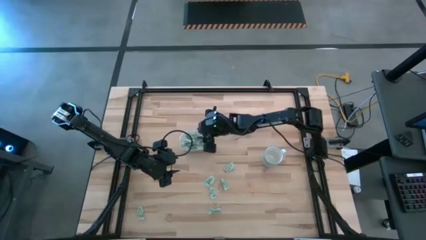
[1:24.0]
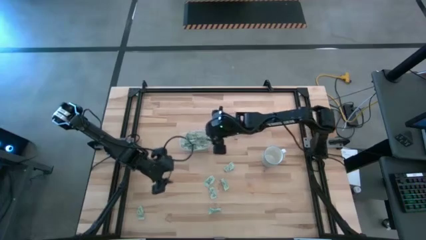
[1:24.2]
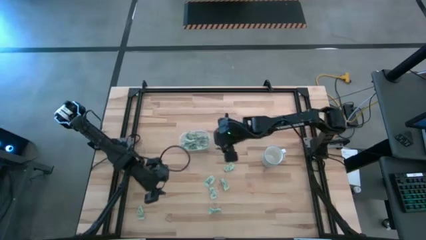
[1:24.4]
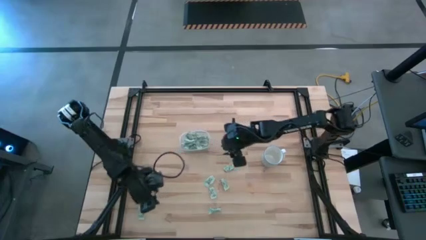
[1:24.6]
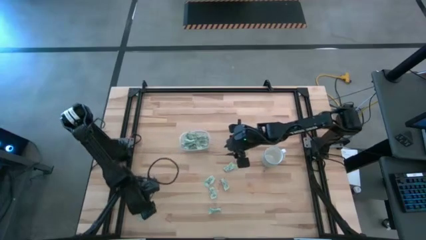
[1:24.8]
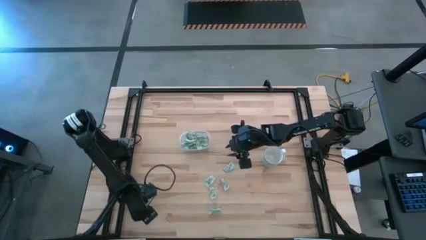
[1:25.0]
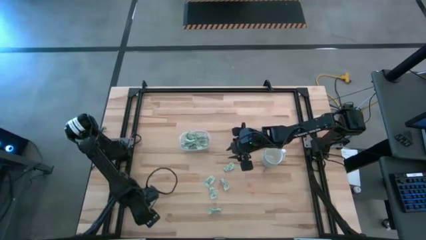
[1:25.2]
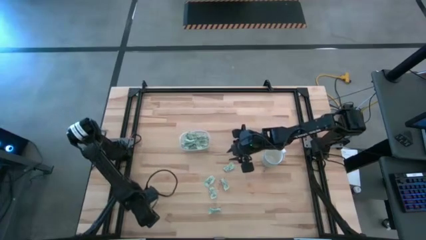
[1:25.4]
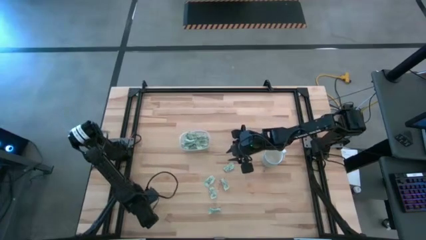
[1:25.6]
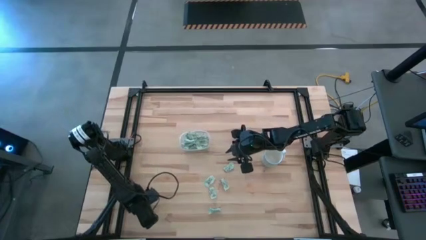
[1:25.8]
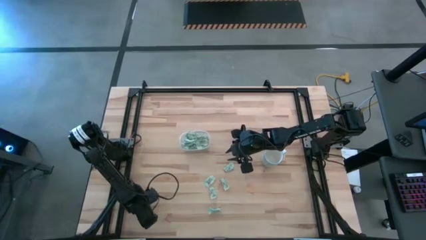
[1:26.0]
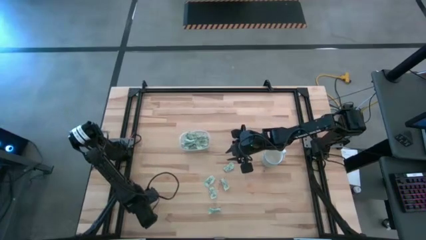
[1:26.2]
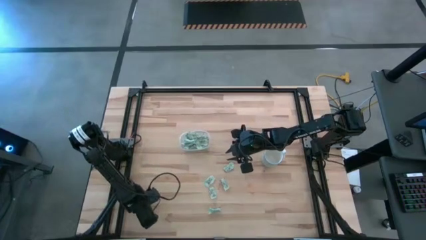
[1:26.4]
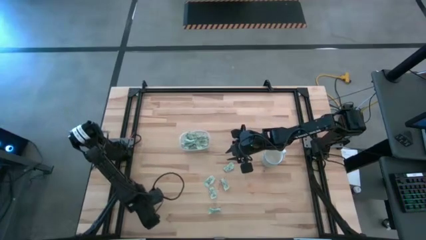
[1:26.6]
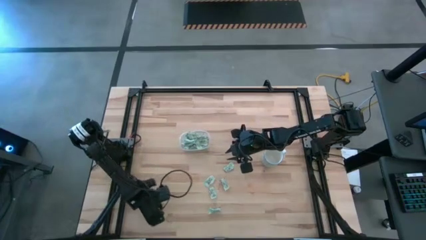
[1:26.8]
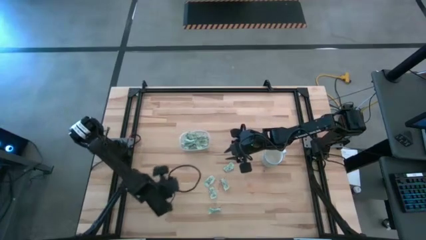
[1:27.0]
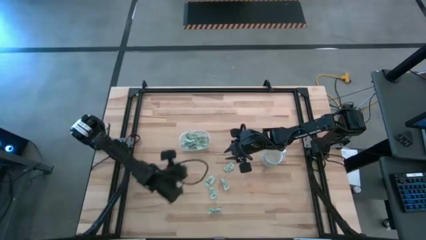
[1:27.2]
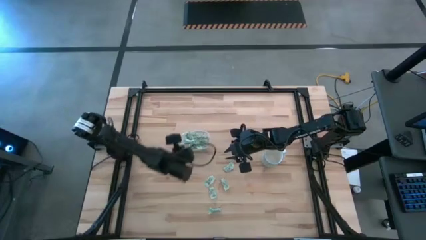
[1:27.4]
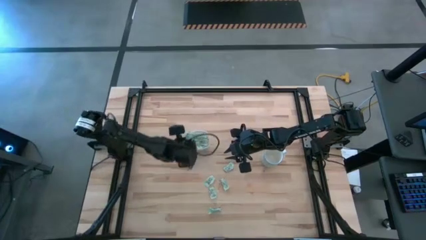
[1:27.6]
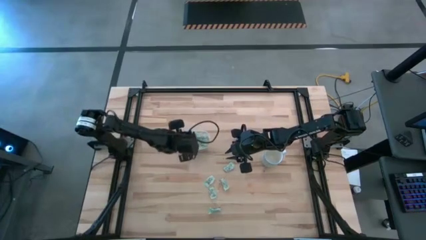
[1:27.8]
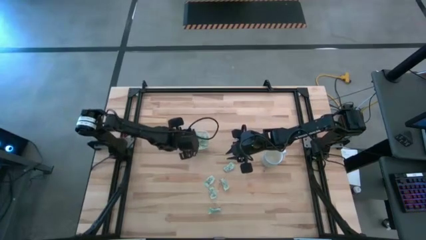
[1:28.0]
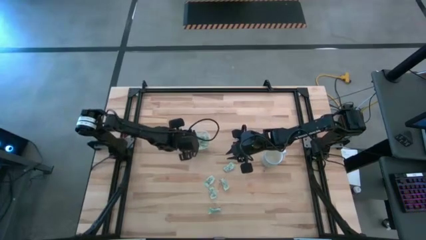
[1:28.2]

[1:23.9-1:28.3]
Task: Pick and place Stevia / Truvia into bins
Put the stevia packet into the transparent bin

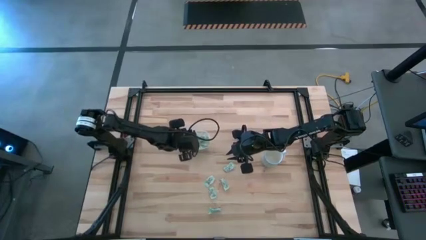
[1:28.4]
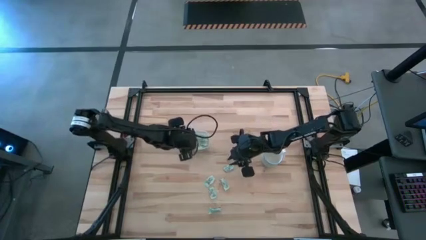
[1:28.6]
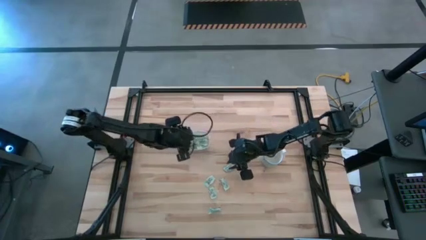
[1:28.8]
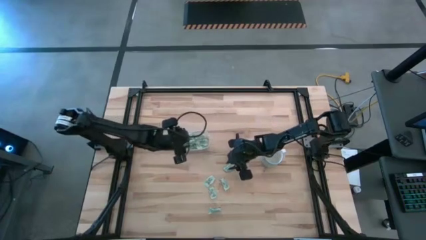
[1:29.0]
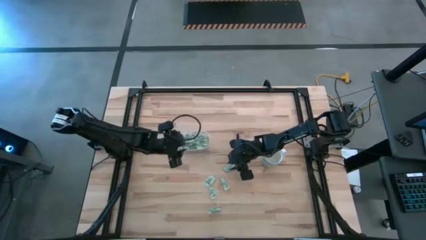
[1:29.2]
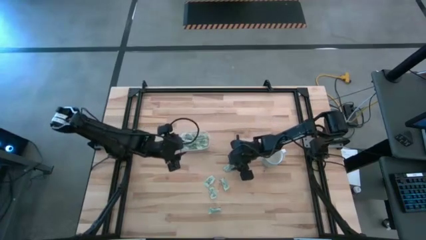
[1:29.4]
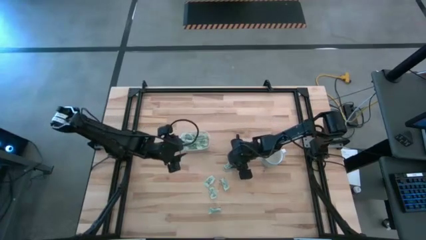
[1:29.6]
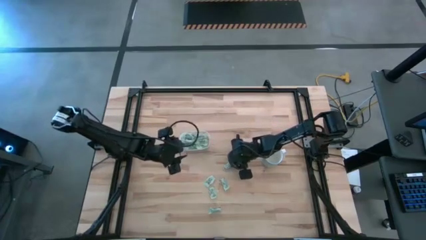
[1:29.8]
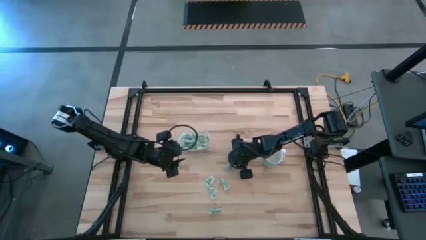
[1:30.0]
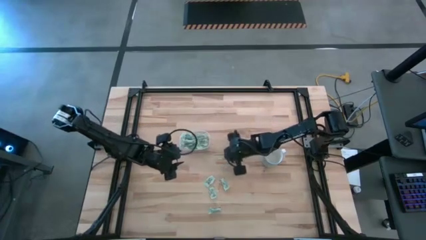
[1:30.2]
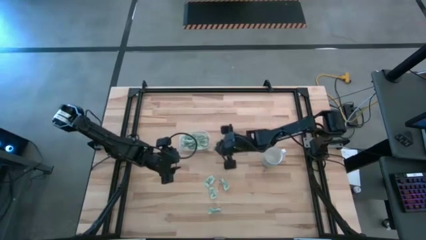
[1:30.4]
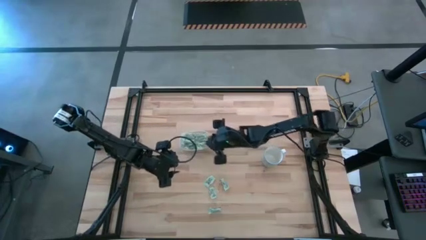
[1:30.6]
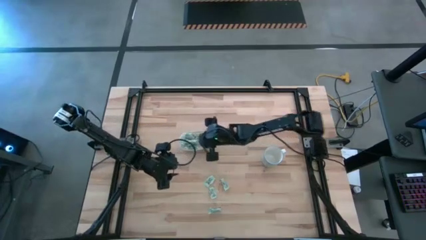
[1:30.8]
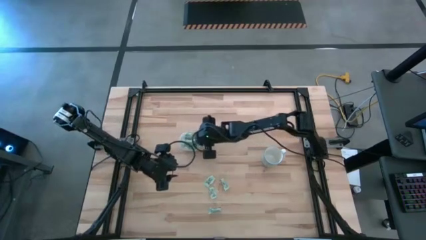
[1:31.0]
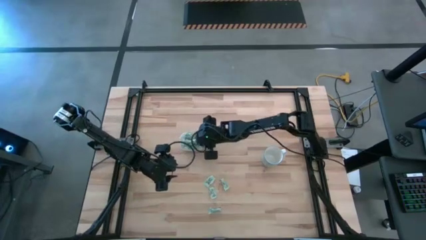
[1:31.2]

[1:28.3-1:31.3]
Put the stevia packet into the transparent bin

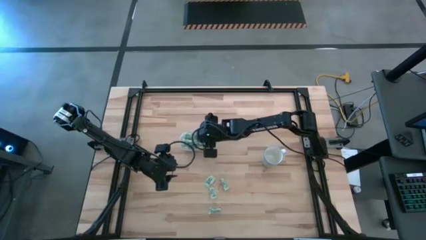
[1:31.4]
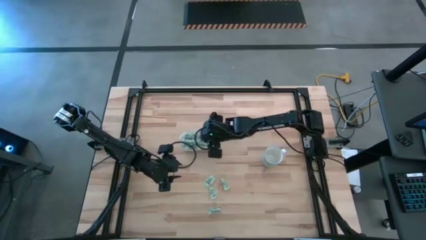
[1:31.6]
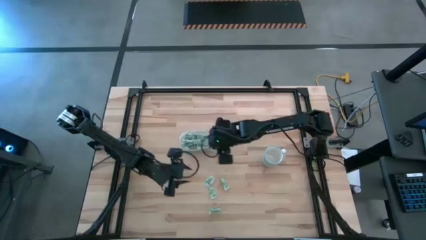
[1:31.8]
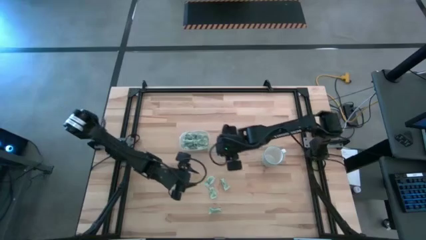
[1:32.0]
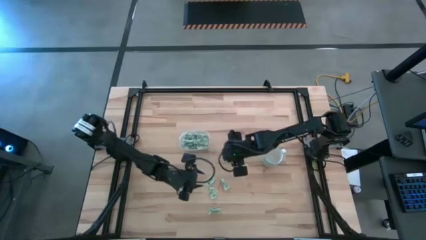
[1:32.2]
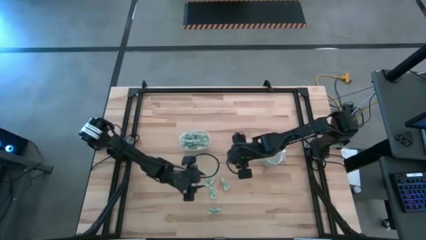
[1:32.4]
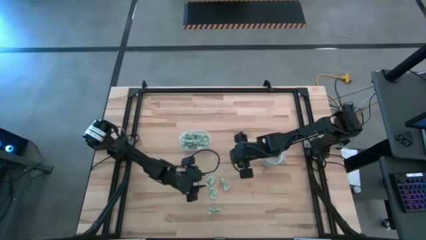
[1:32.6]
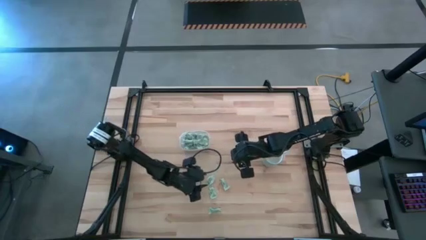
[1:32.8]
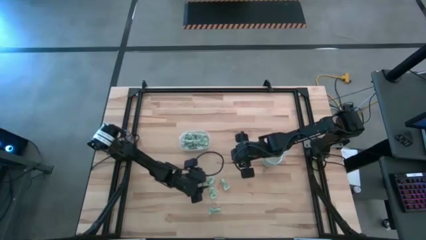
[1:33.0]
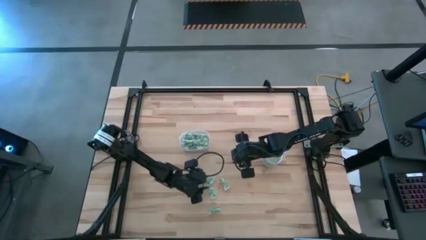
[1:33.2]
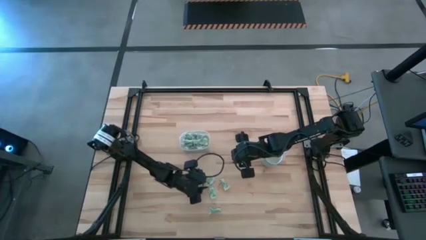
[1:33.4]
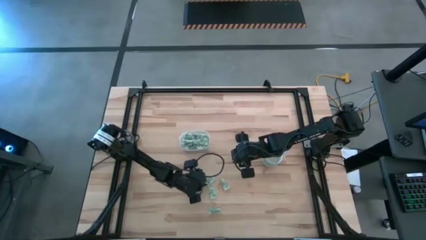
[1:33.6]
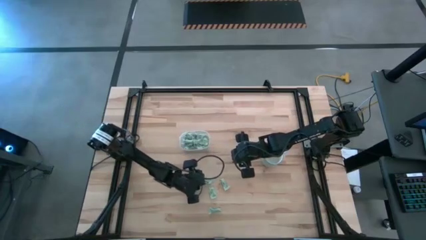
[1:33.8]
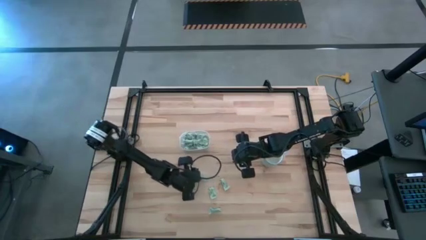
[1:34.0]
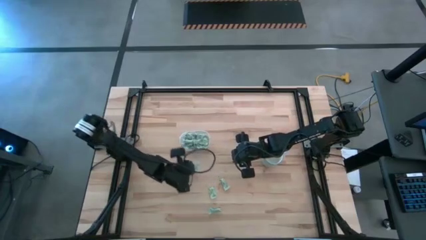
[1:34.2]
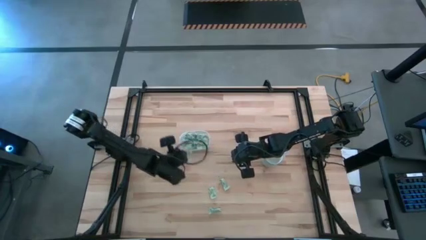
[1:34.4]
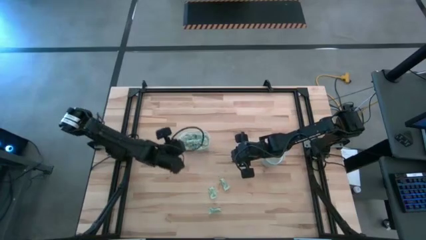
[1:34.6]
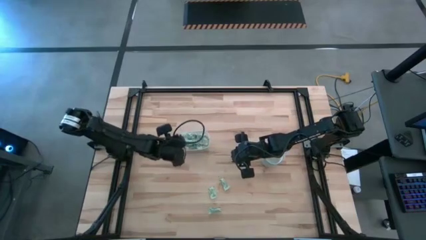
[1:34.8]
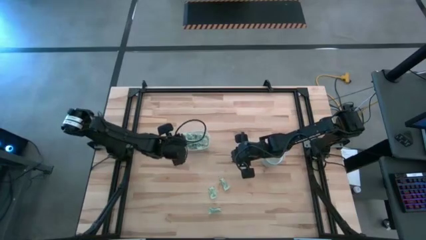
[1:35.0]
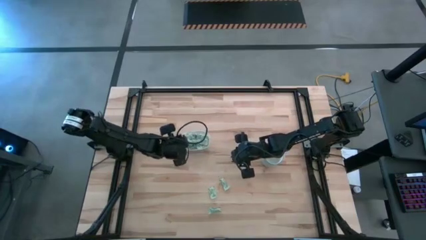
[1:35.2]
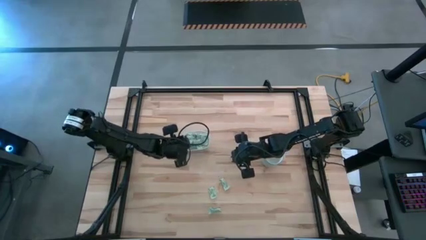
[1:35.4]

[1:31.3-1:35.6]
Put the stevia packet into the transparent bin

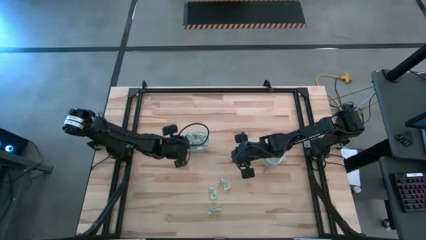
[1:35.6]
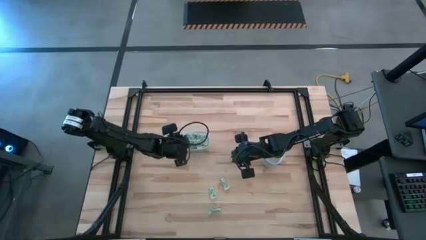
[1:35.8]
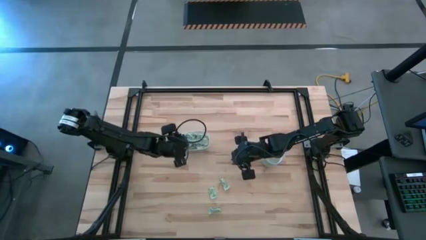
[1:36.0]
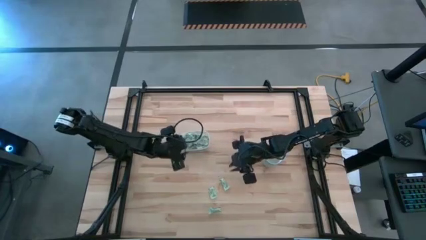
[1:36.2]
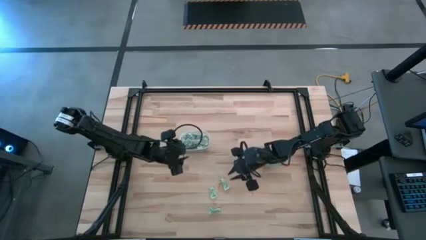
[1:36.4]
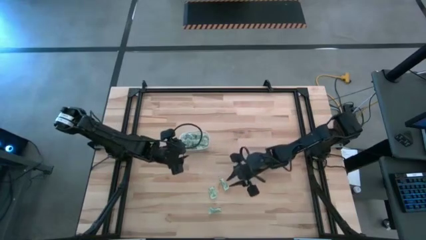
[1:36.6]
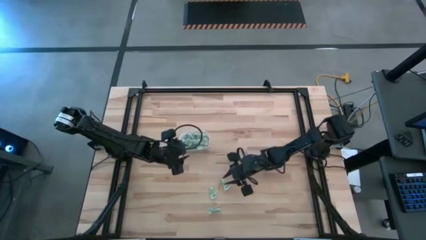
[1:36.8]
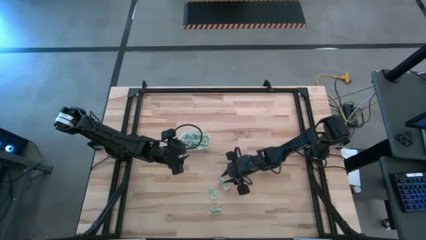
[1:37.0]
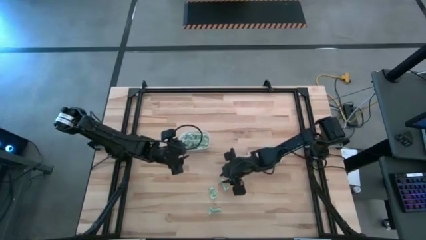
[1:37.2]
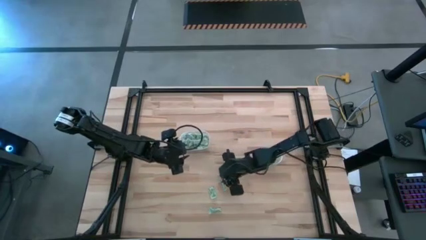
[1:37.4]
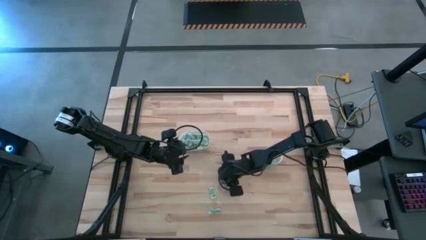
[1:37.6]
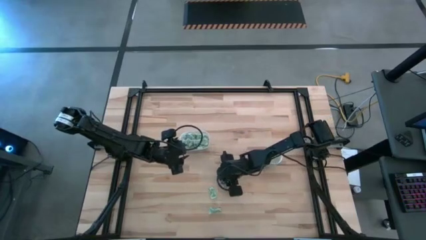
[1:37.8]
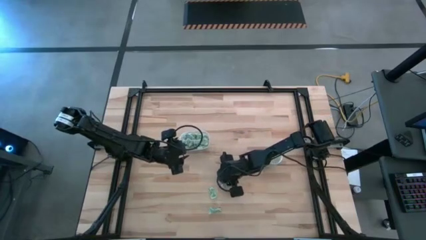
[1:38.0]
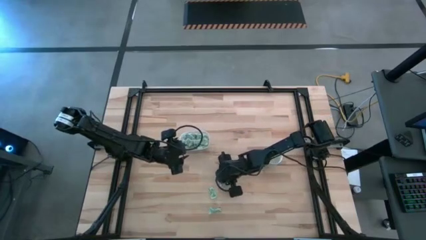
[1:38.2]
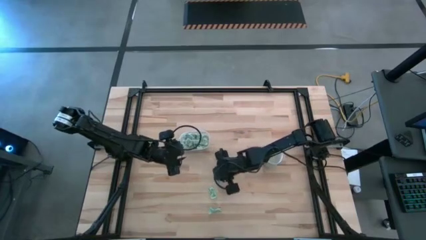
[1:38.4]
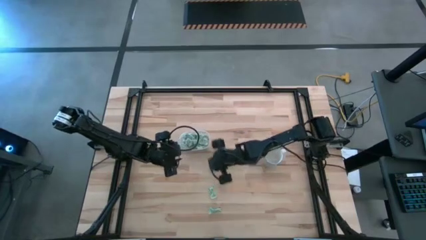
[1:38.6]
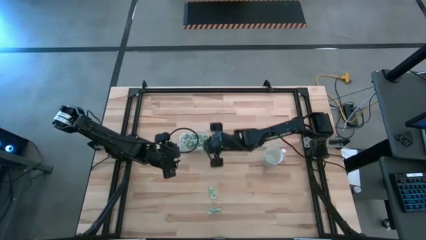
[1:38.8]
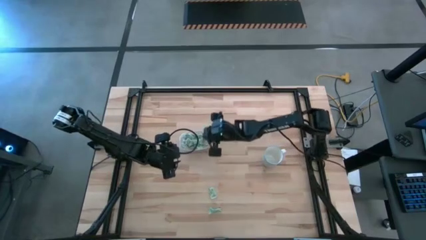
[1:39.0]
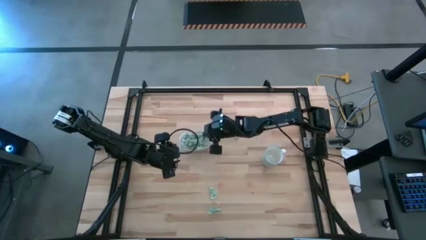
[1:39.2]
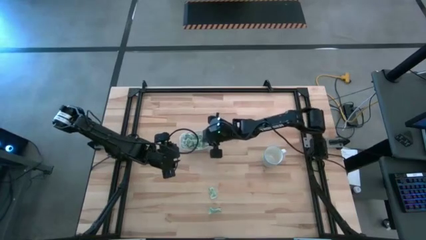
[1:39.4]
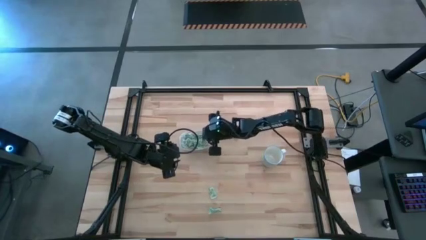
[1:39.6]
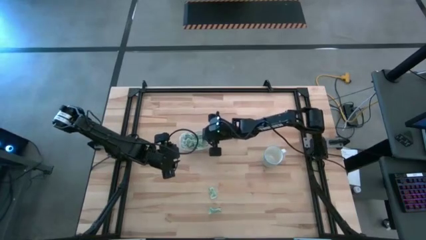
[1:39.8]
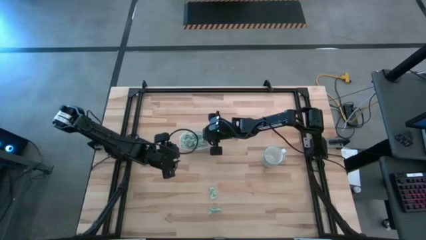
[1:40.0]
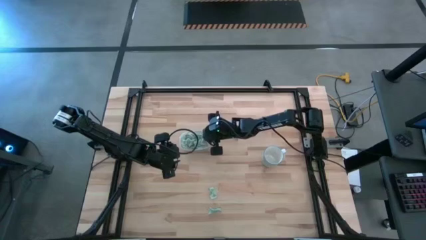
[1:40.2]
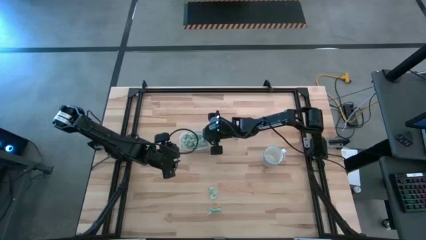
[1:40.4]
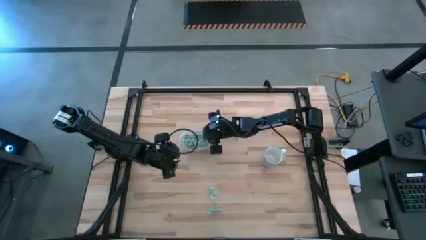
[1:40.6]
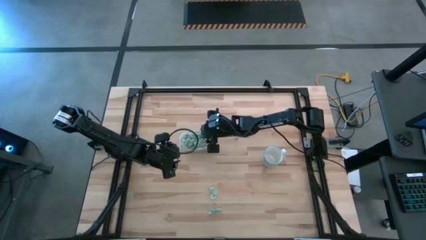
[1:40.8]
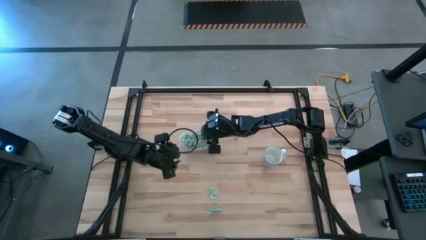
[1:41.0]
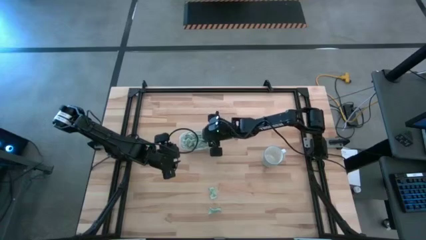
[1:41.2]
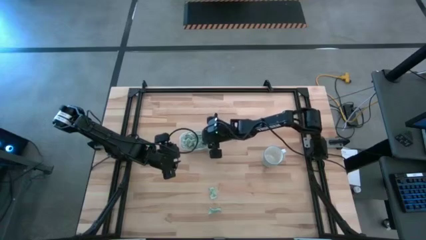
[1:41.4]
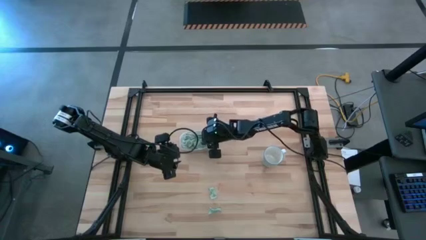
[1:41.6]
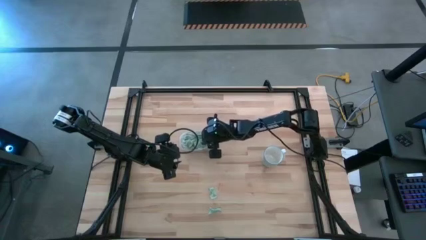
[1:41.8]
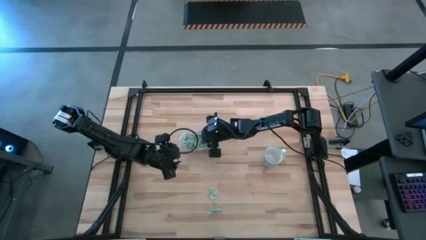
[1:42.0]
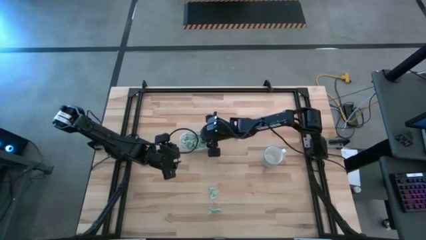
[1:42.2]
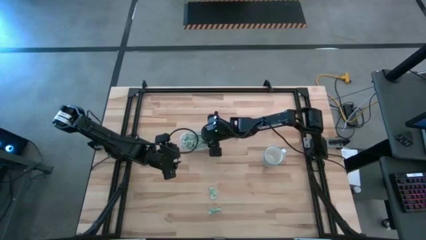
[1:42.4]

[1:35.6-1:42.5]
Put the top stevia packet into the transparent bin
